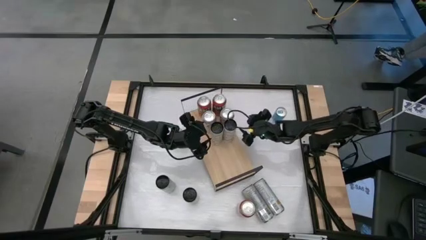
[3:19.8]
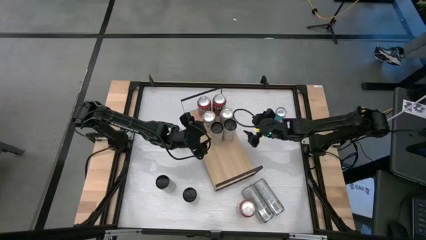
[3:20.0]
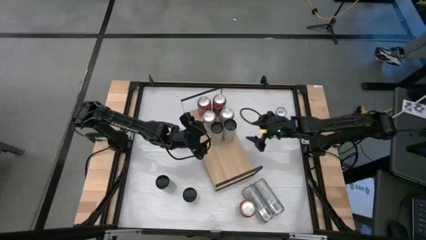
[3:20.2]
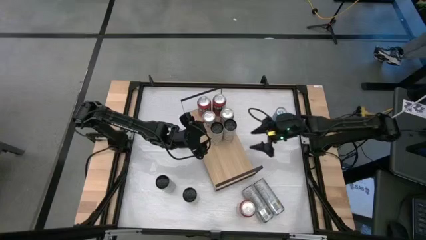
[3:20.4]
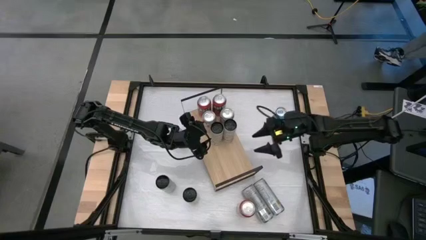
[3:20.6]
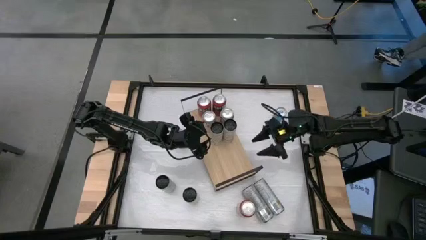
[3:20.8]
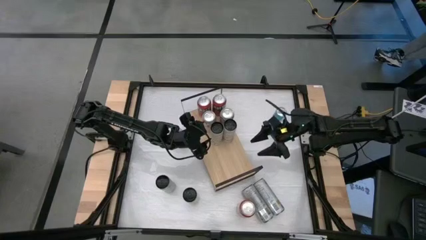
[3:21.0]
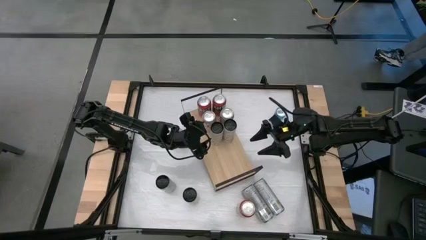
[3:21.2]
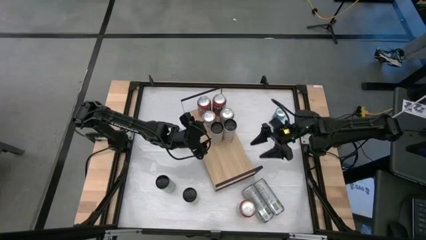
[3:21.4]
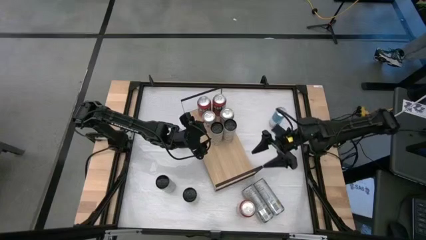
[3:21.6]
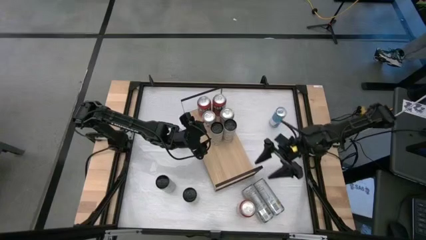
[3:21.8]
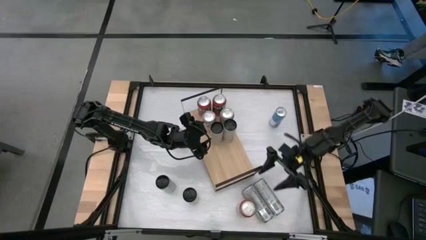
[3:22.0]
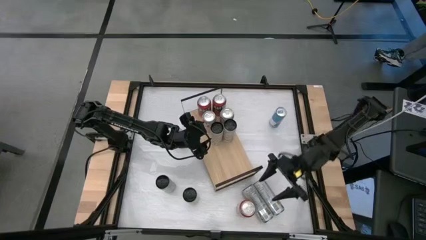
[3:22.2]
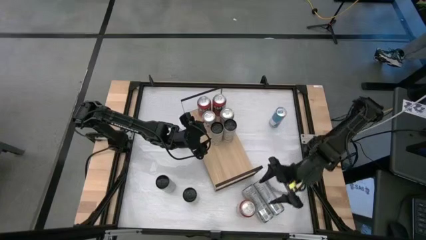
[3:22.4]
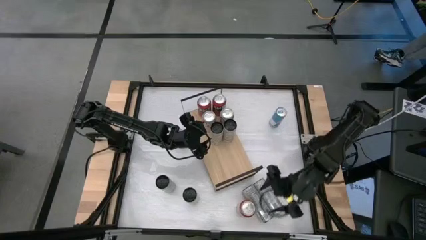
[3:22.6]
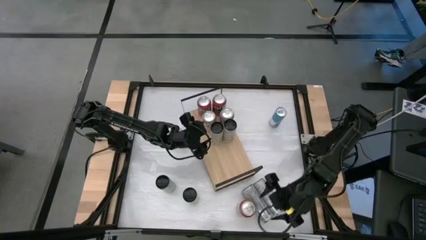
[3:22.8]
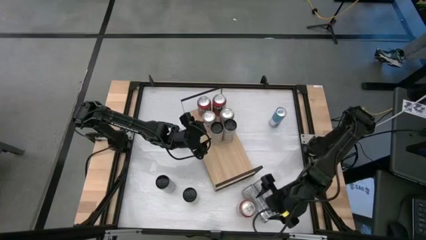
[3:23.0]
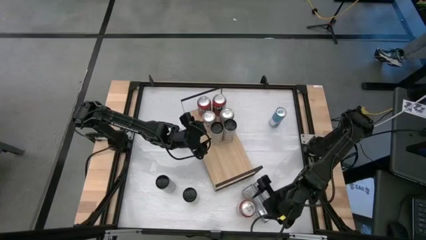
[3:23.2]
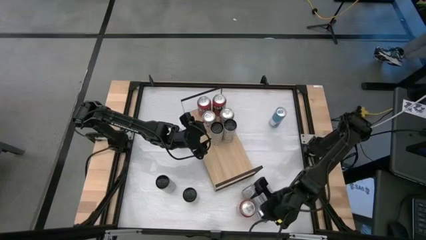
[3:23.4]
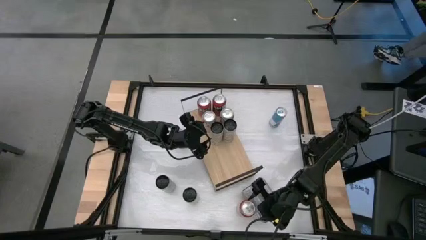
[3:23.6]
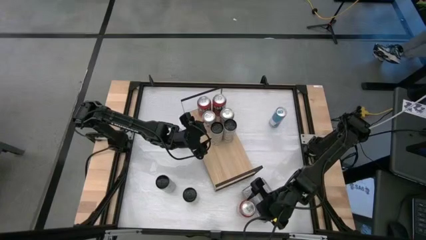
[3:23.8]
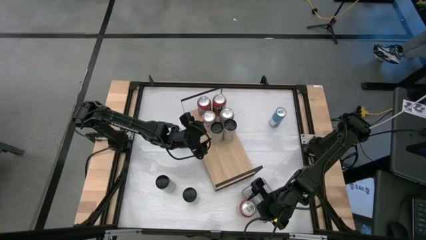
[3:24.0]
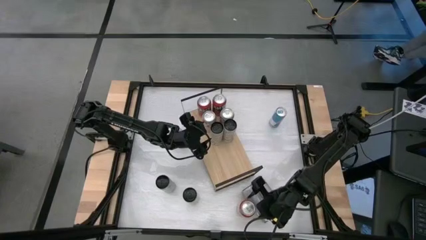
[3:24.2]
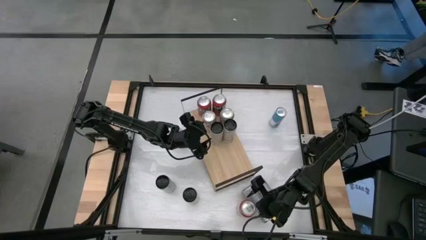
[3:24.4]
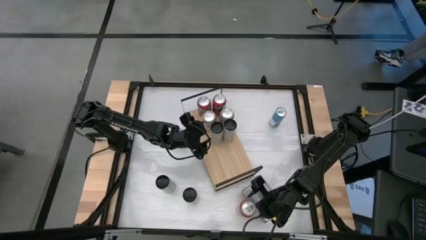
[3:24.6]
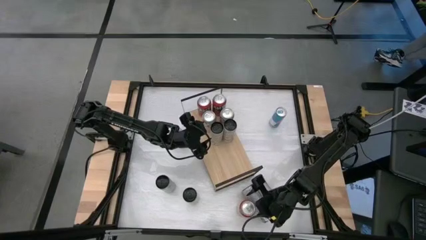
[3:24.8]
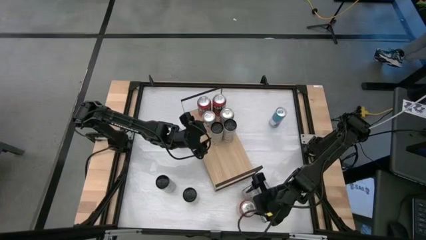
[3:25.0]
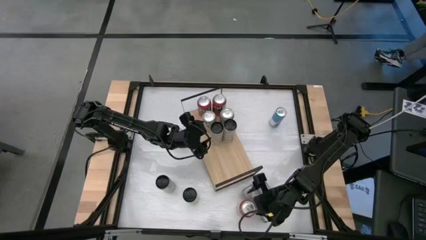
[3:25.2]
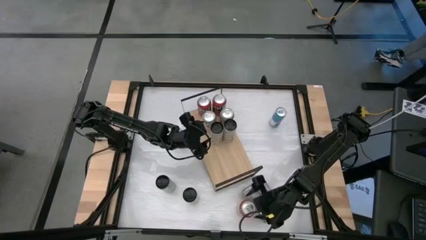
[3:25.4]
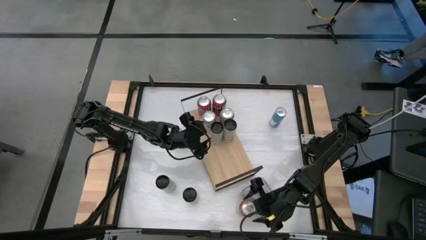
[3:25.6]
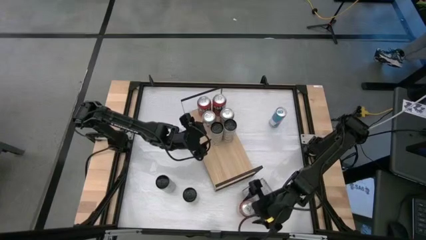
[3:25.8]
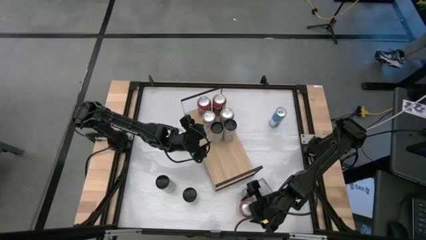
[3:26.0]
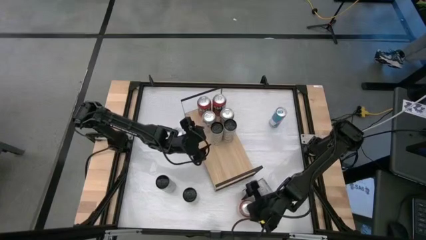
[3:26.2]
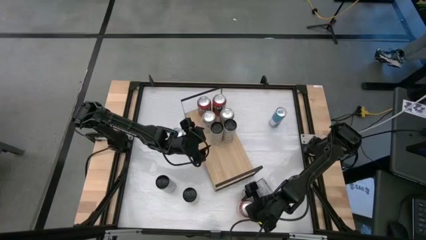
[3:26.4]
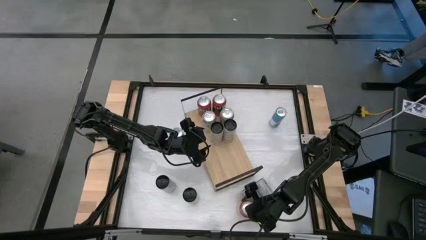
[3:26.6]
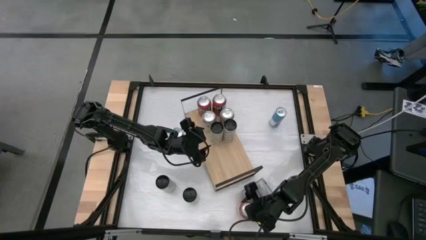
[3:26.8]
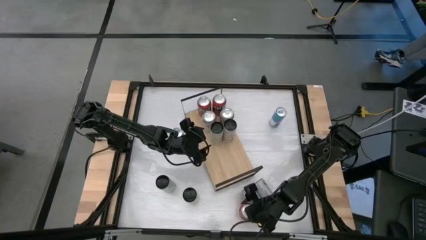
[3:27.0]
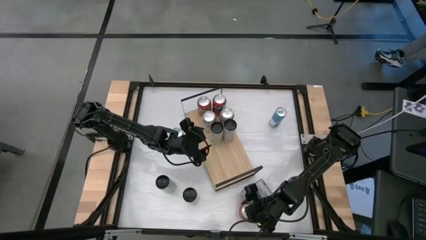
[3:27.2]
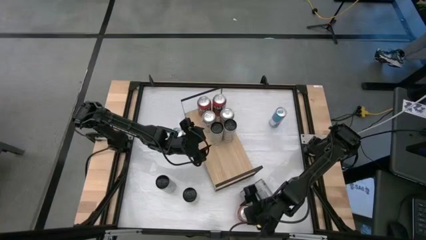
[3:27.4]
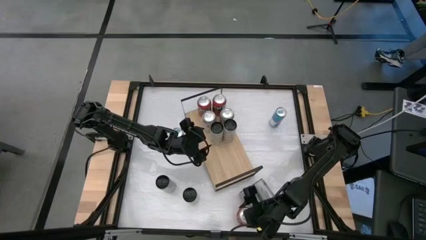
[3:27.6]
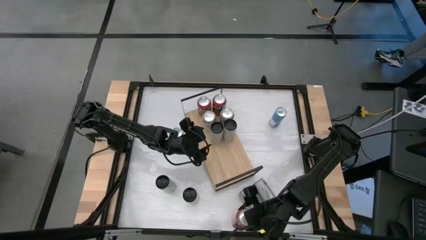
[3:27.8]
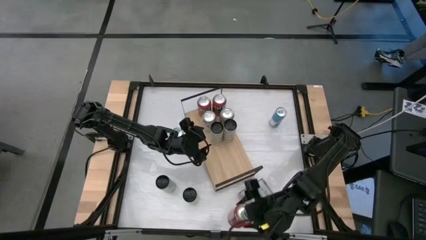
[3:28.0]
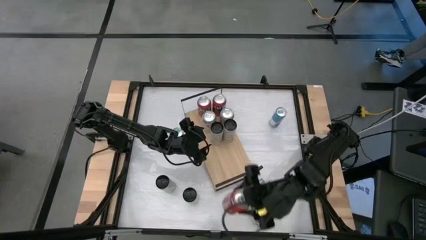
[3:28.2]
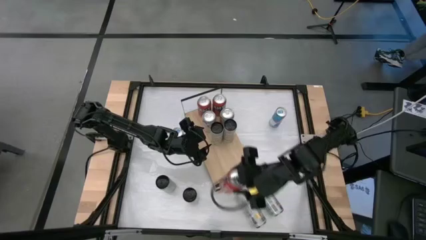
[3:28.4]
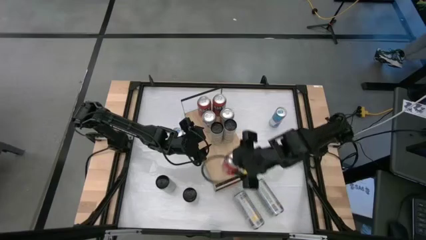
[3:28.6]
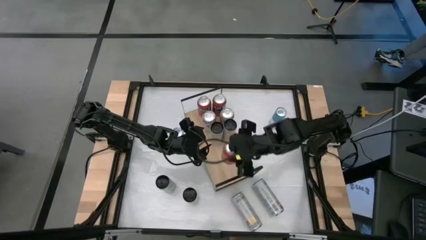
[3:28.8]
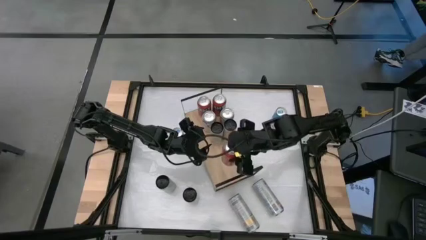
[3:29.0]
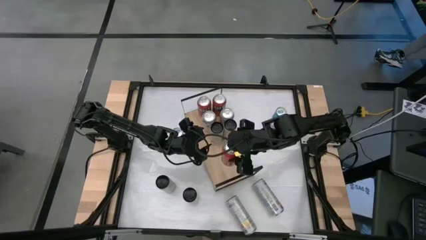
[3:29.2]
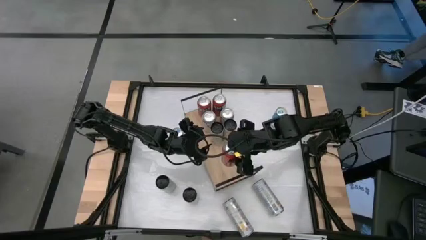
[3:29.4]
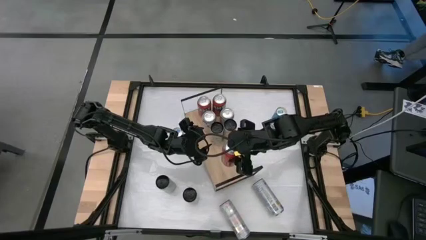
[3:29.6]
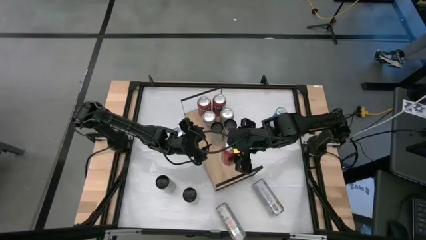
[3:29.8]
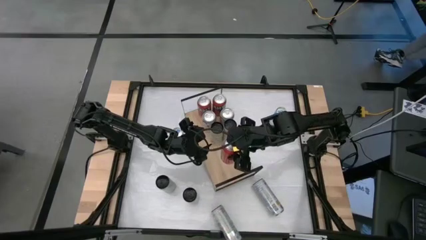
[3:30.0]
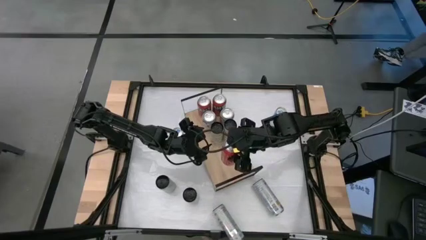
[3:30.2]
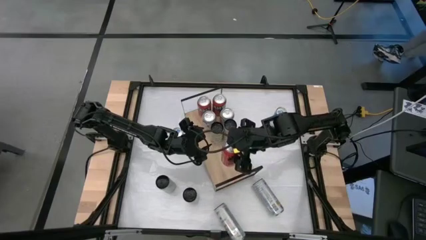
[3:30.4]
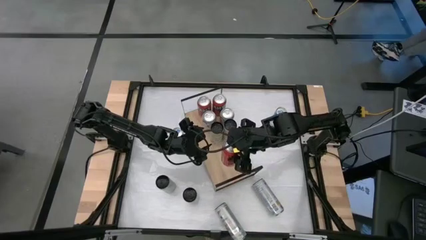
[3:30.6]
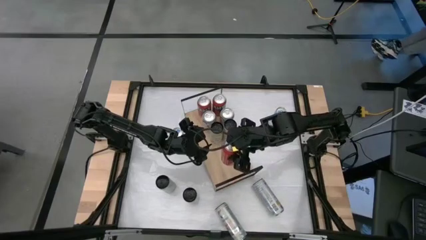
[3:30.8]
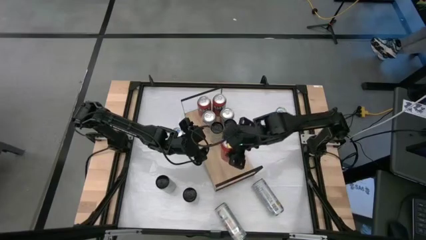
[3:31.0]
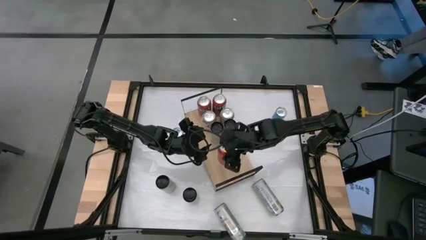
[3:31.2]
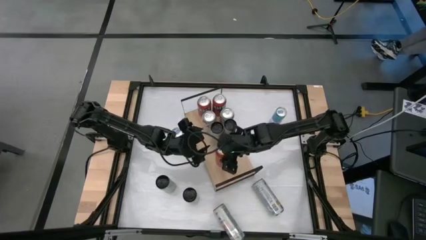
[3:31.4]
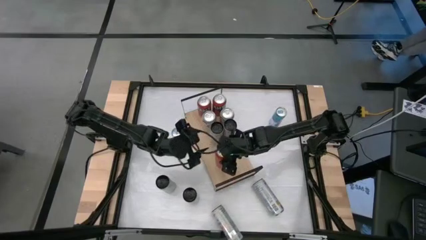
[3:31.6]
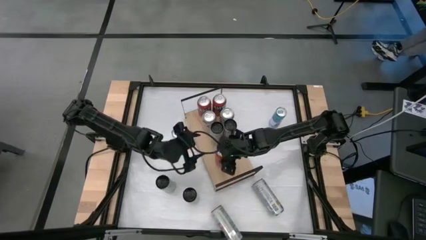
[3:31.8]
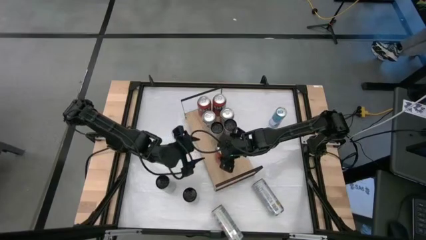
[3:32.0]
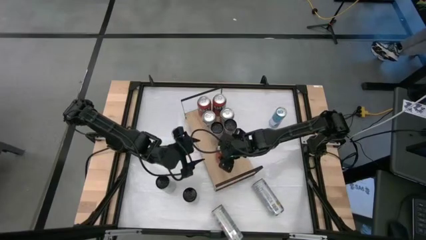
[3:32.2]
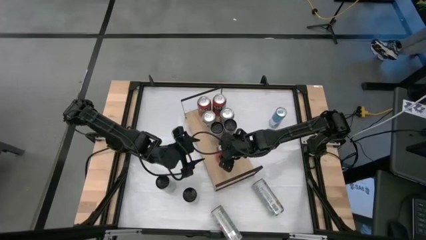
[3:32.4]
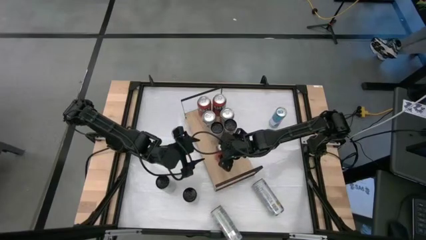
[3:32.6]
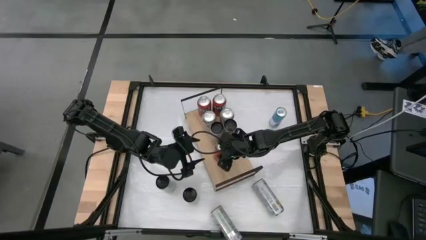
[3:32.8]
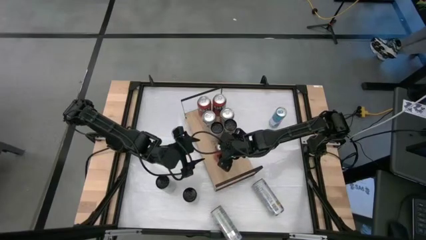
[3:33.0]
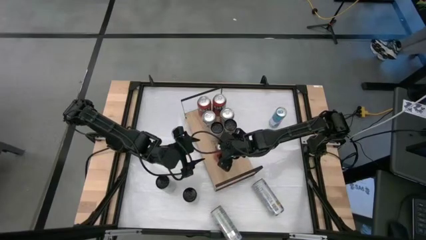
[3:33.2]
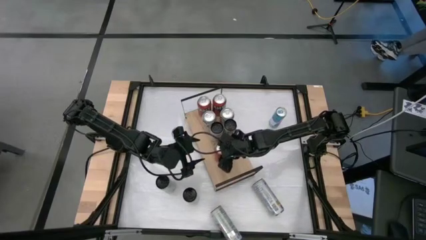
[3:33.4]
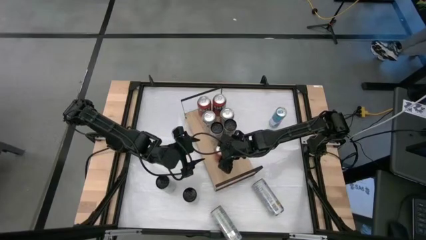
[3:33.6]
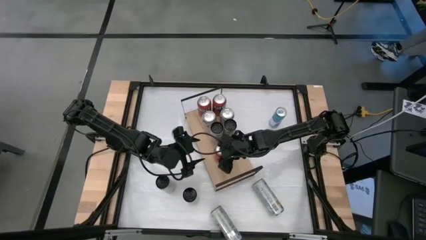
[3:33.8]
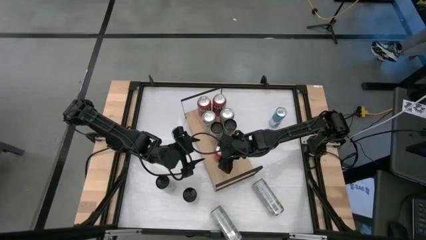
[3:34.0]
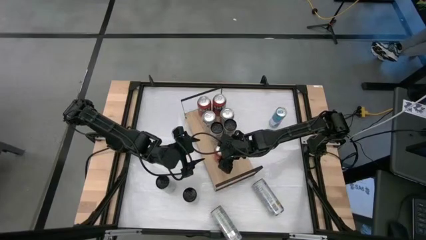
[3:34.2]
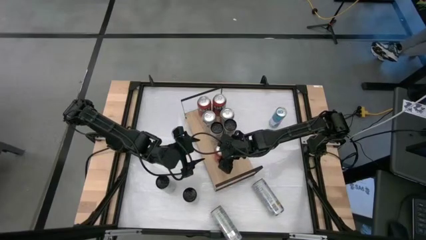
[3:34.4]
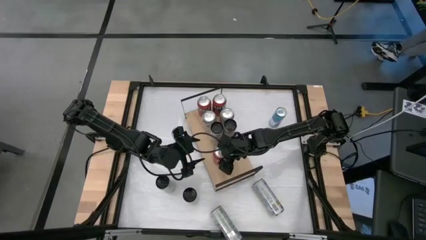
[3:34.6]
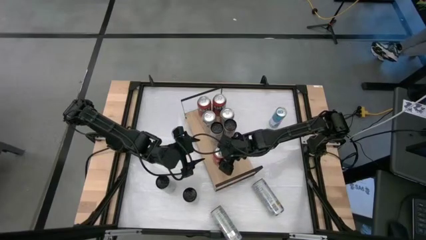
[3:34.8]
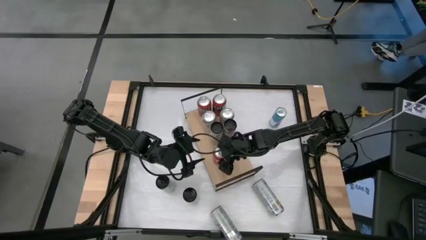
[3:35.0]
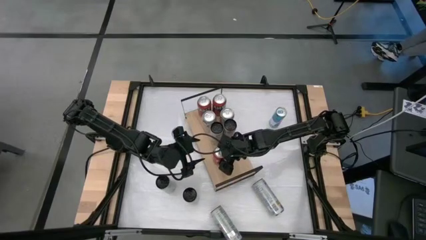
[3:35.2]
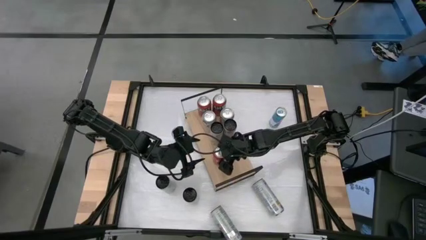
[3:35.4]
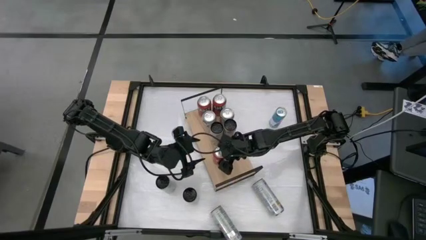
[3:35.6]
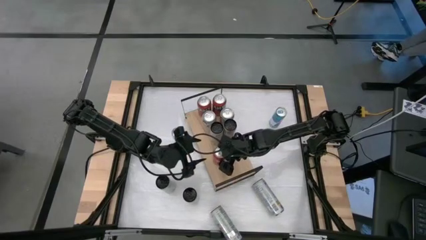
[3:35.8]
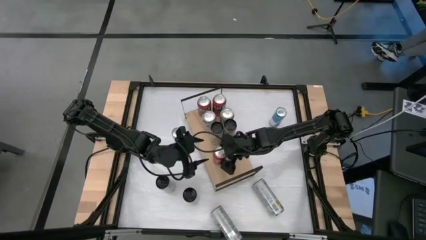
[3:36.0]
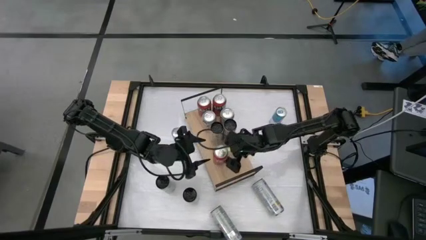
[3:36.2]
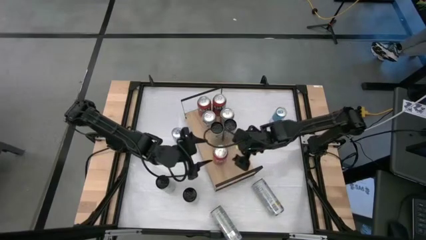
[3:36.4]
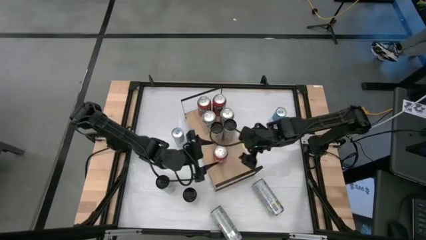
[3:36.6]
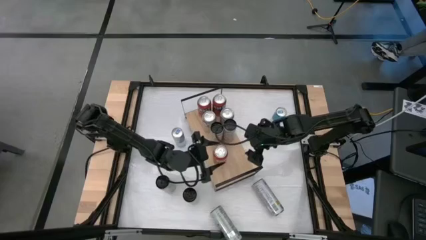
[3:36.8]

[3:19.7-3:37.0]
Task: Place canned beverage on shelf
Align the orange soda can with the other orange soda can
